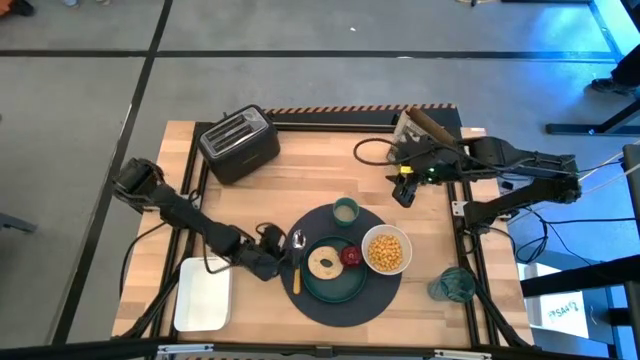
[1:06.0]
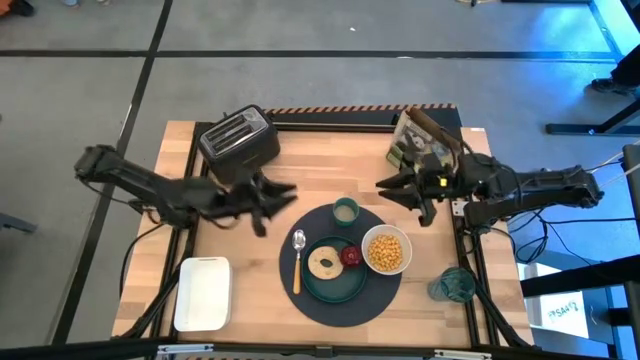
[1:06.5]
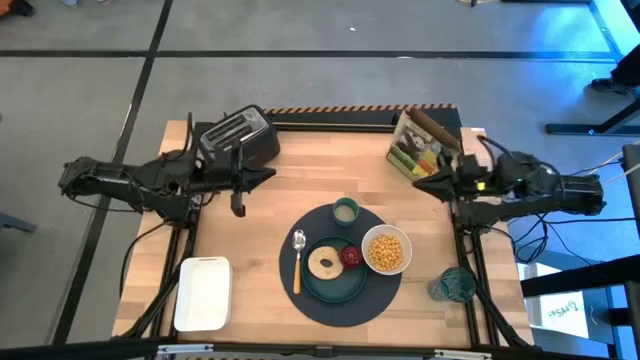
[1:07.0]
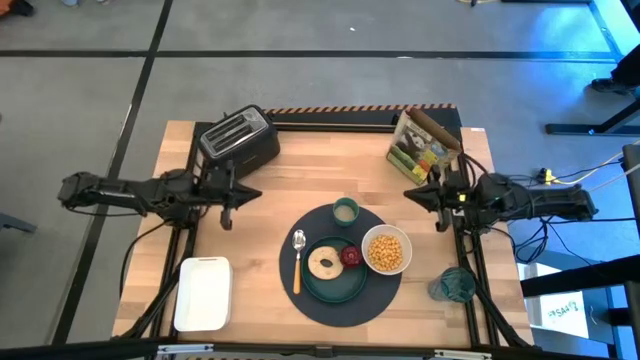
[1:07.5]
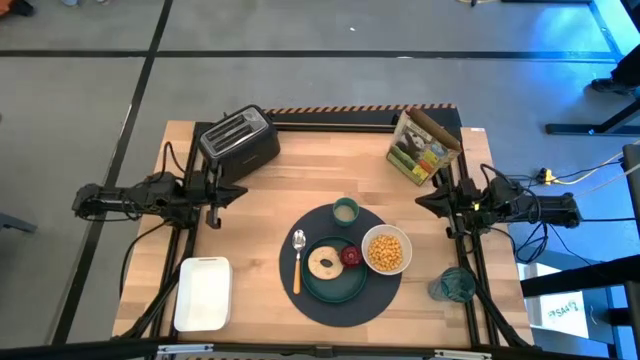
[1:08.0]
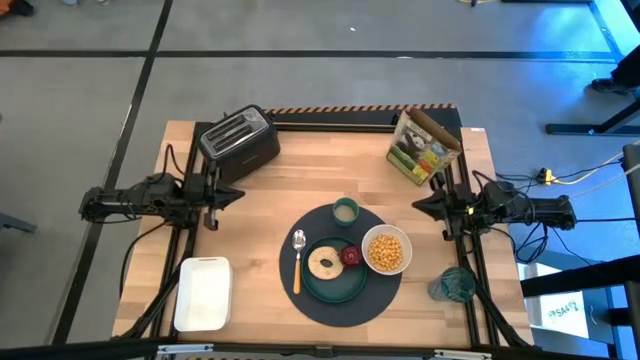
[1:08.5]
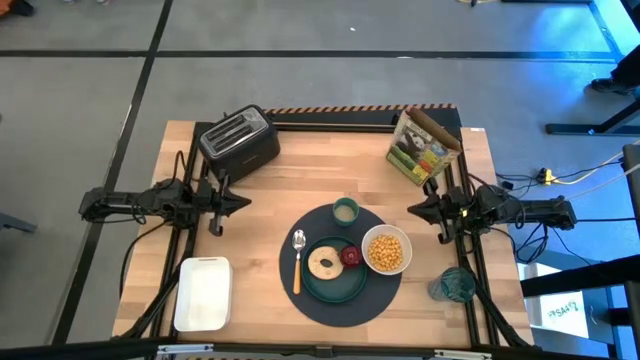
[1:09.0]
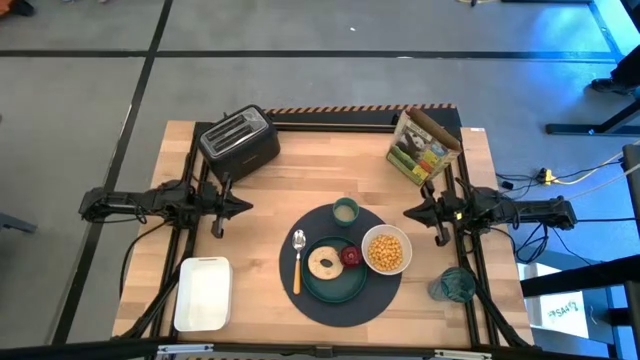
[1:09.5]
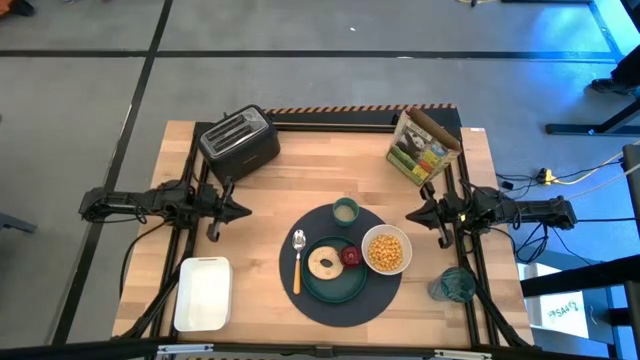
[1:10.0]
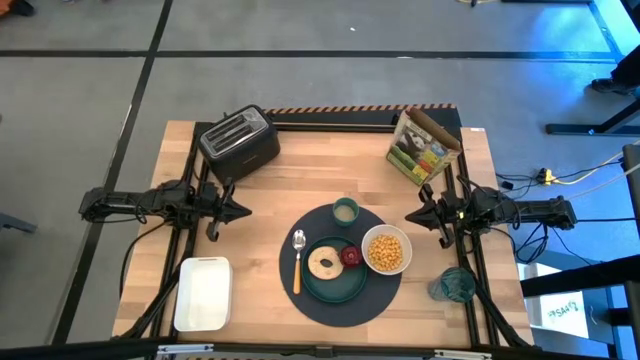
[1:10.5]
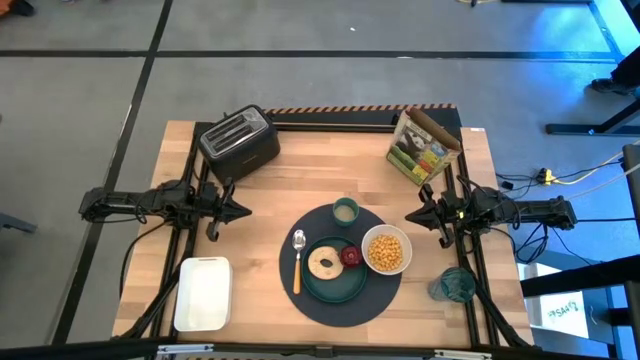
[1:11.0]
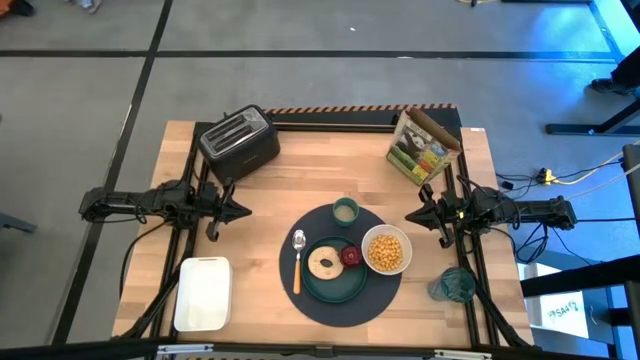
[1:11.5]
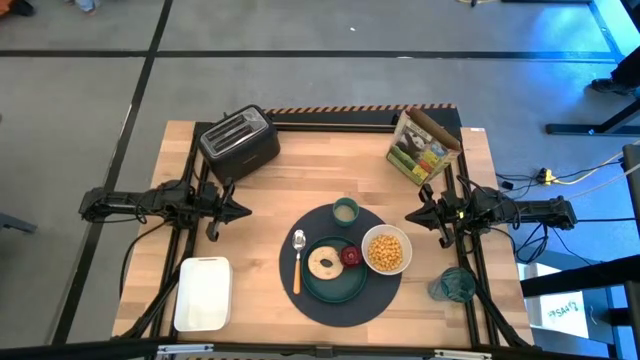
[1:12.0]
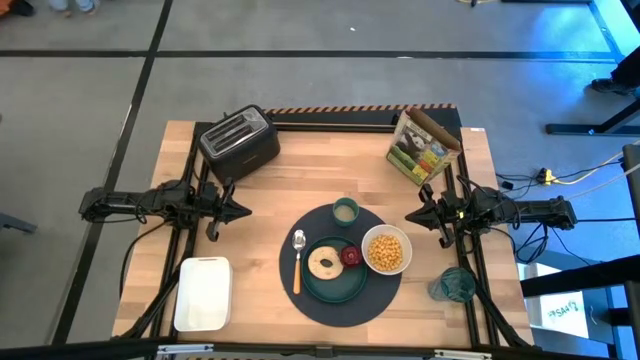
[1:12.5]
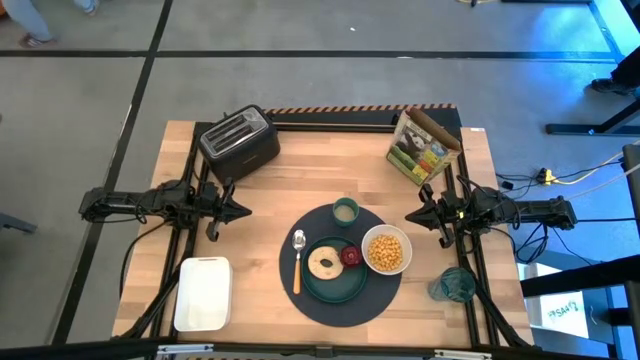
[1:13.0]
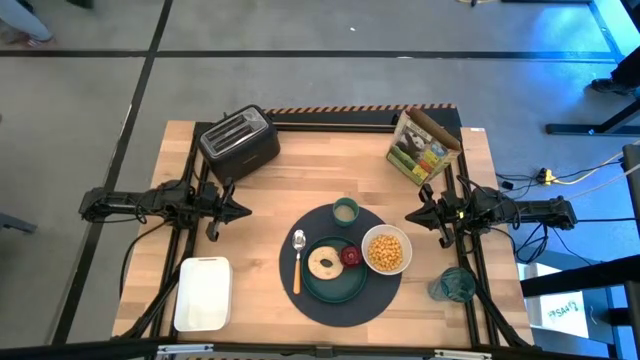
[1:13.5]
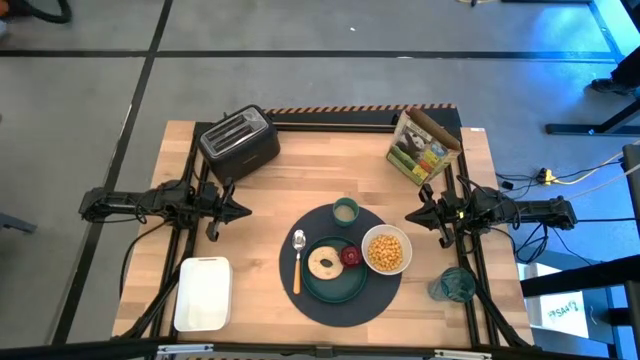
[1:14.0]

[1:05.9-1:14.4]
Task: Arrange a breakfast setting
Return to Home Position

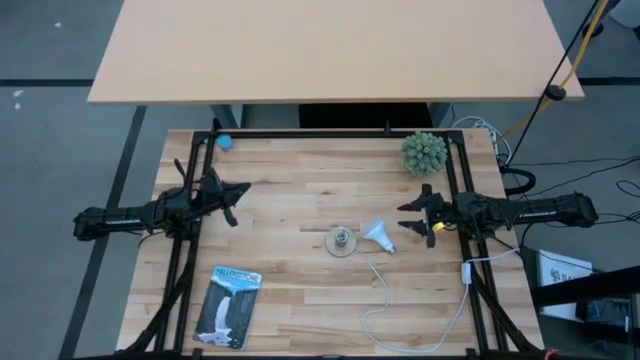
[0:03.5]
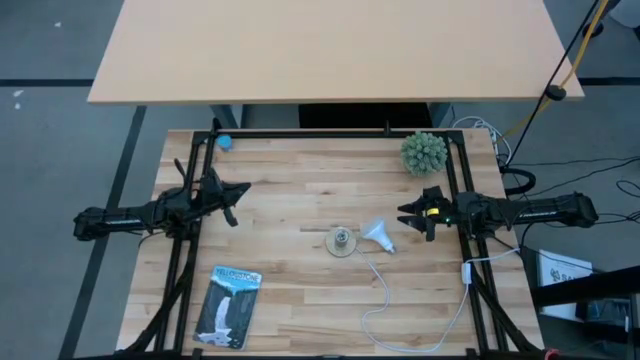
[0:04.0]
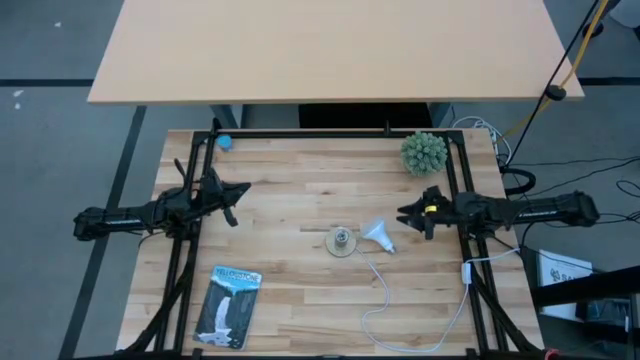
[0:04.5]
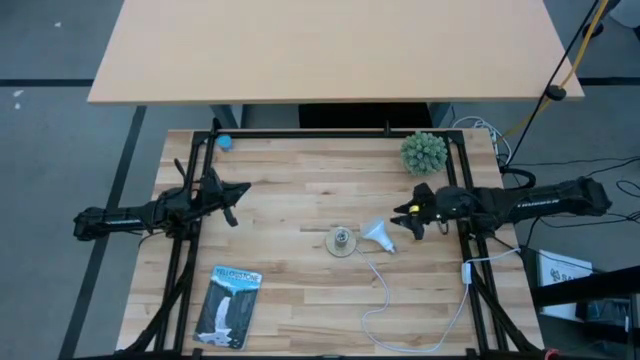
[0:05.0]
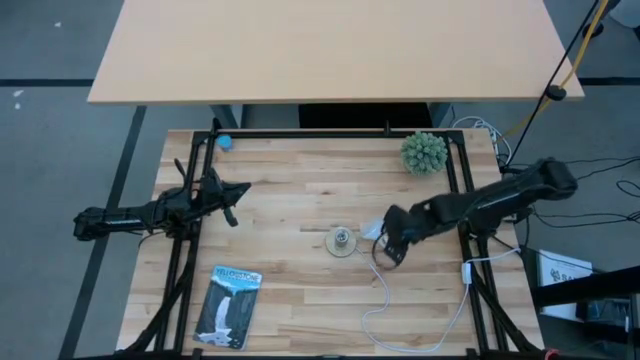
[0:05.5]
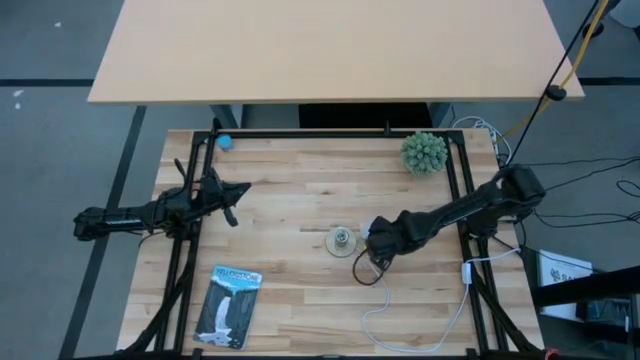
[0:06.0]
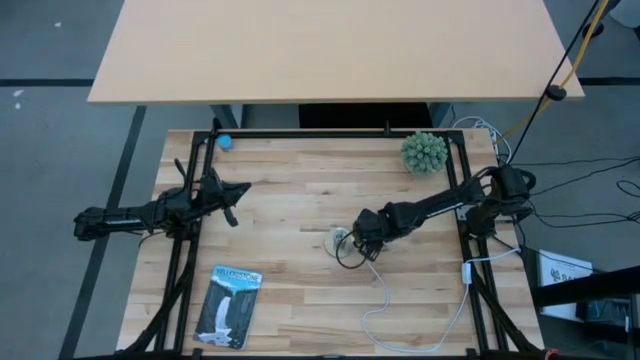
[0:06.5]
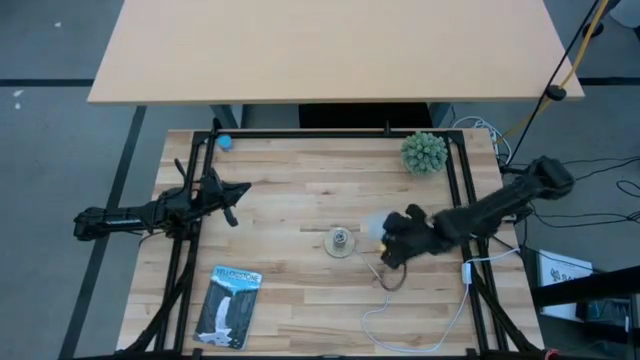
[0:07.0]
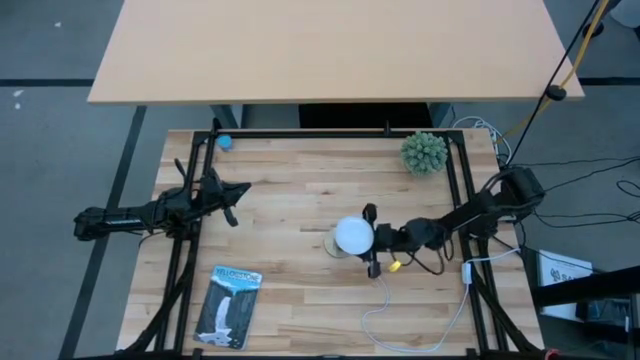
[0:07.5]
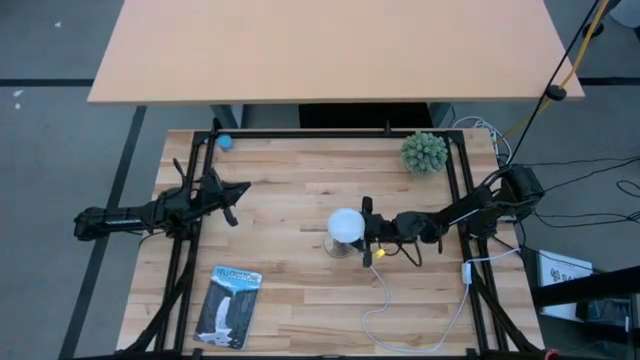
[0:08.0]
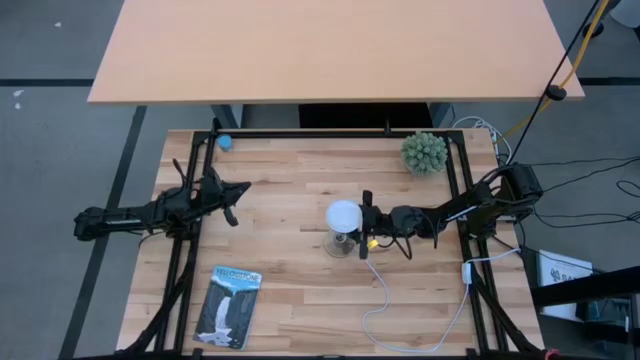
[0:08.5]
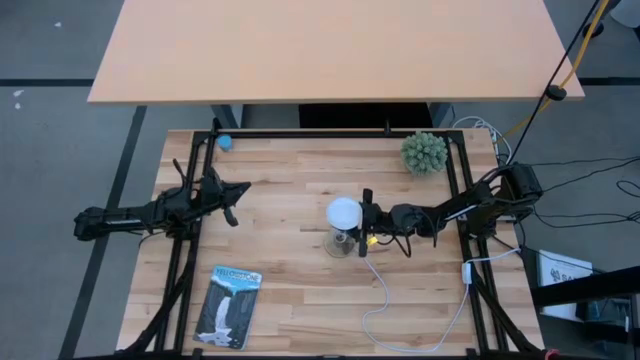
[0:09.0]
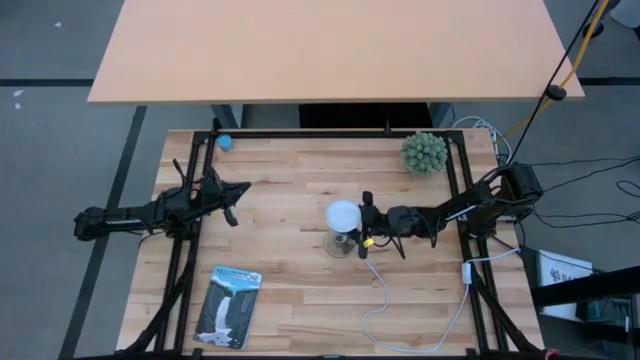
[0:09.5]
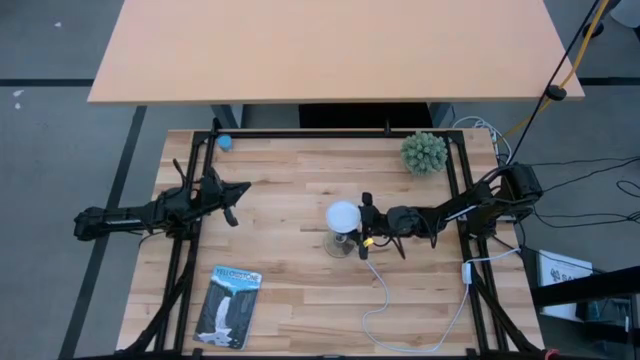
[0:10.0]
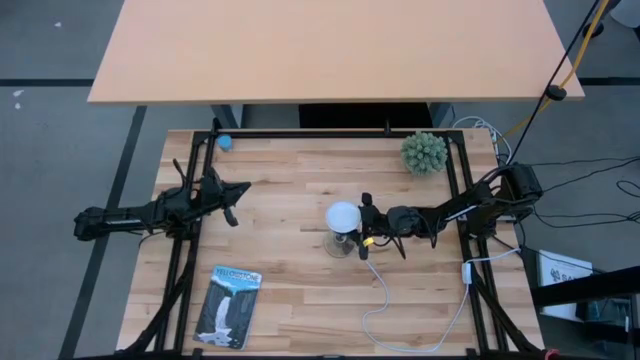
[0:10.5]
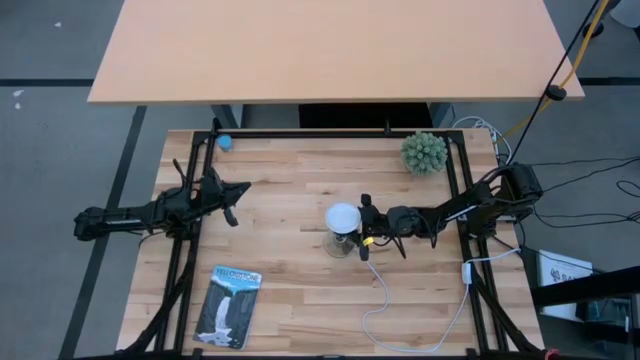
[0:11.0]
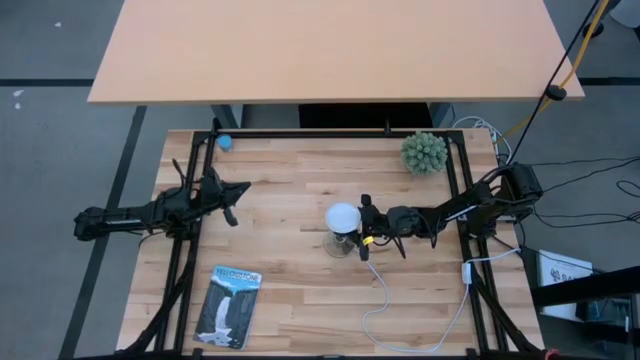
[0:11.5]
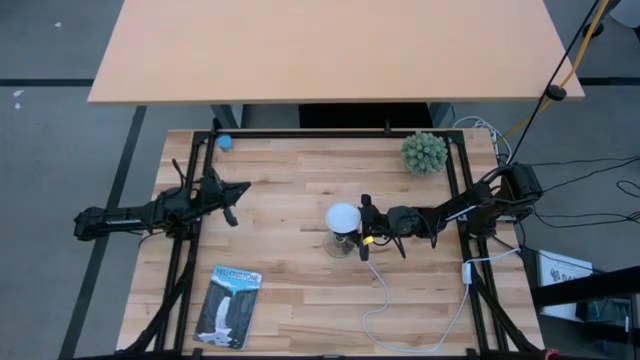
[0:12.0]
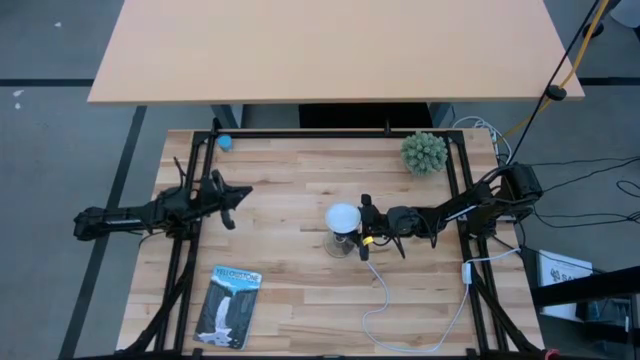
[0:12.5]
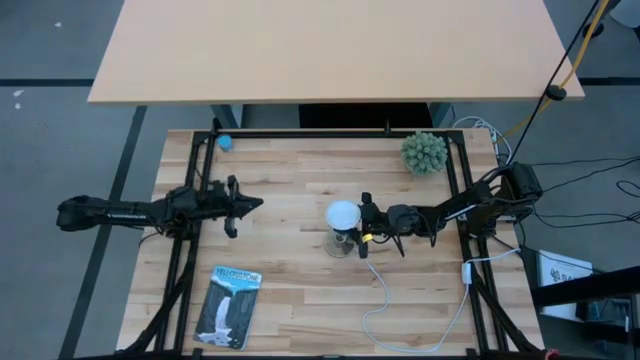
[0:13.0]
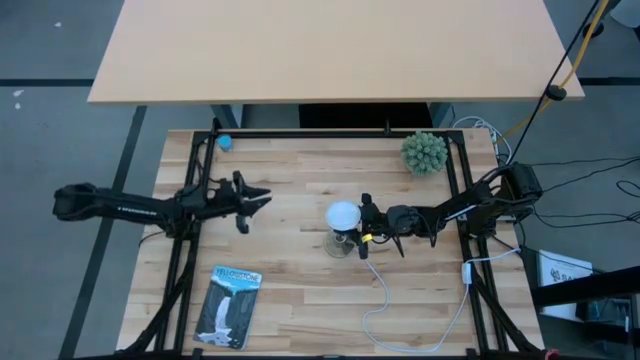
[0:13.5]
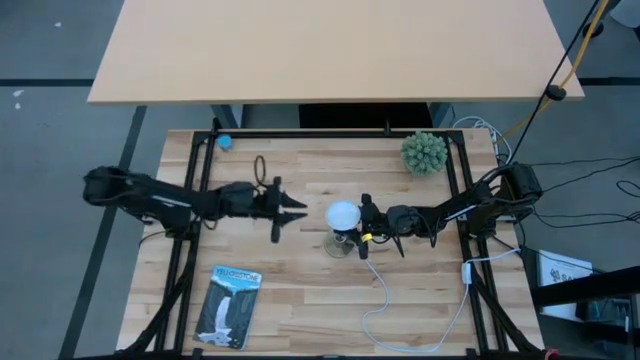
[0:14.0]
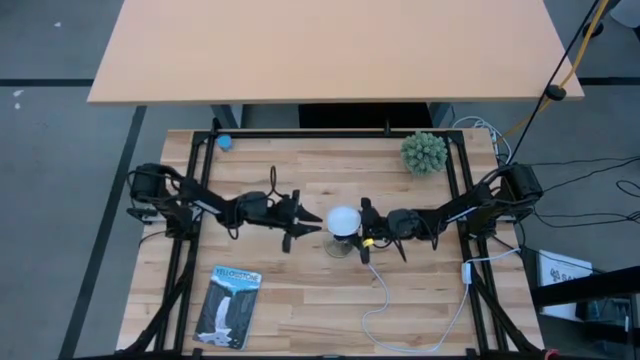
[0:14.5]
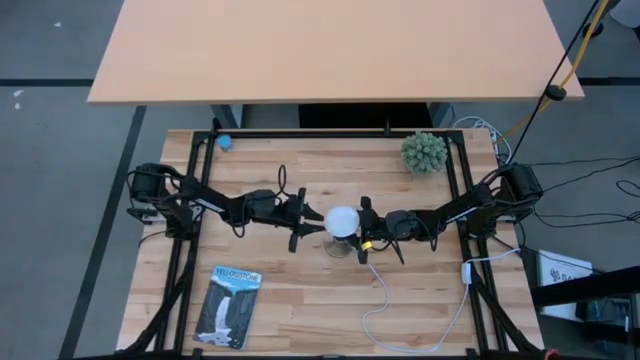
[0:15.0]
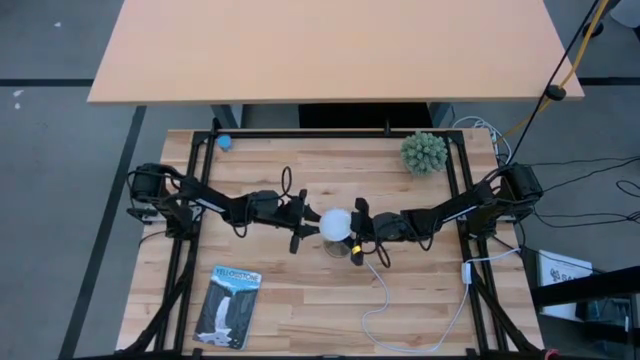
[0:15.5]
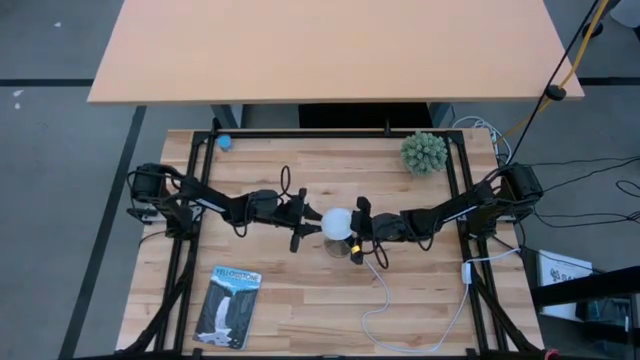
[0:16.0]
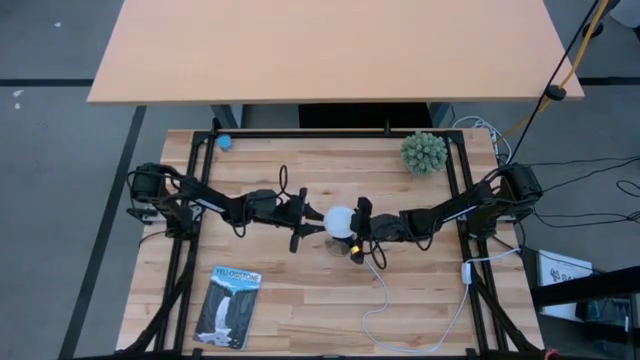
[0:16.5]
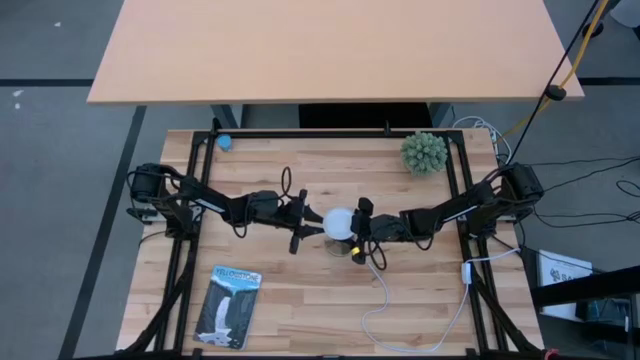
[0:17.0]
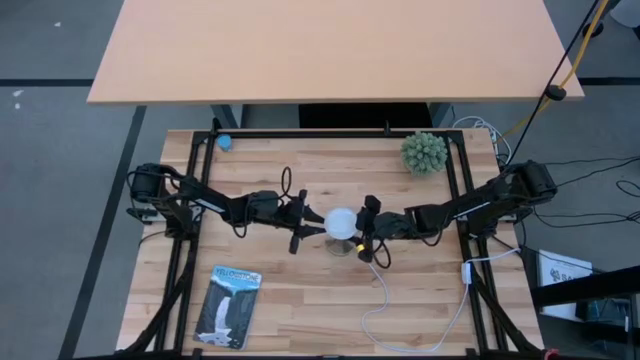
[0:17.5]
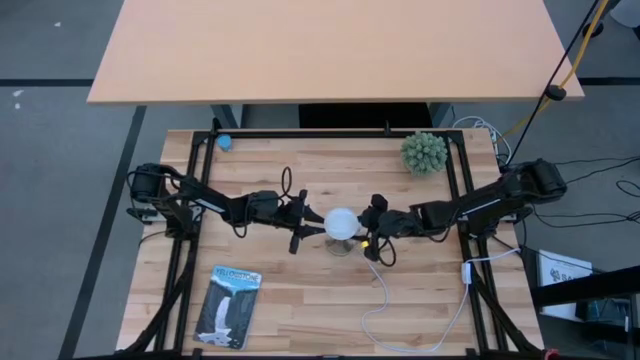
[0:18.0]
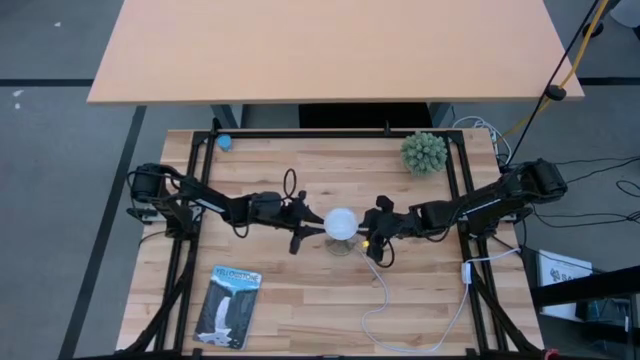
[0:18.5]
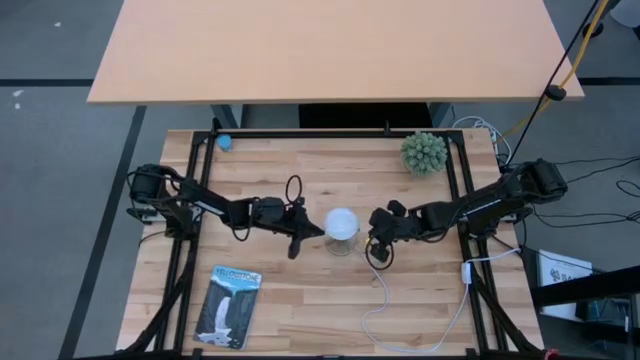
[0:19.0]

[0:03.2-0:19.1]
Task: Screw lightbulb
Insert the lightbulb into the lamp
